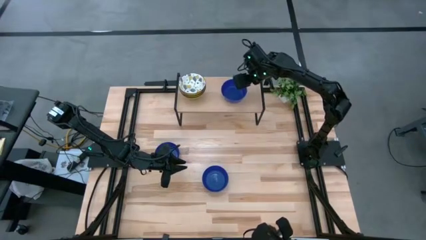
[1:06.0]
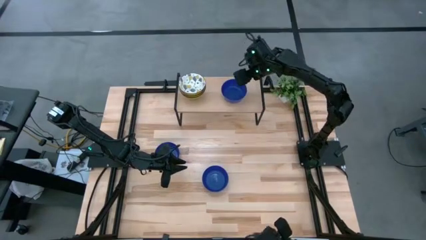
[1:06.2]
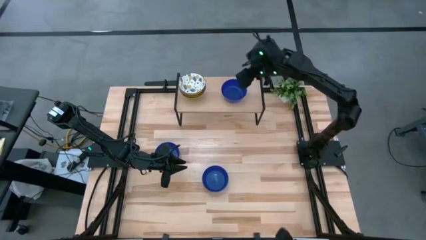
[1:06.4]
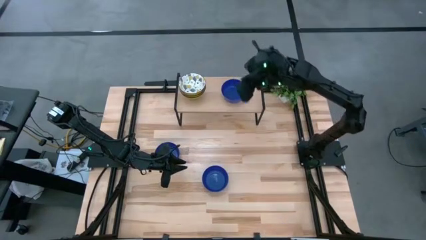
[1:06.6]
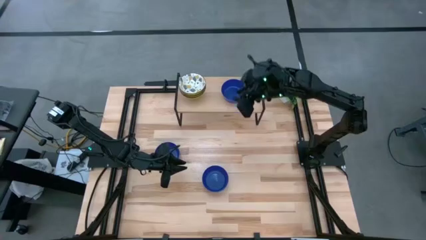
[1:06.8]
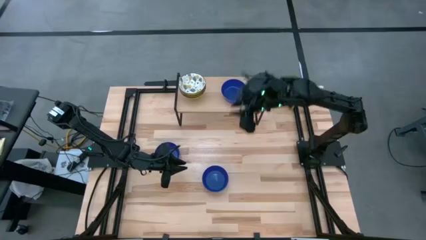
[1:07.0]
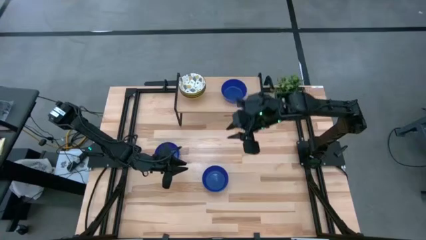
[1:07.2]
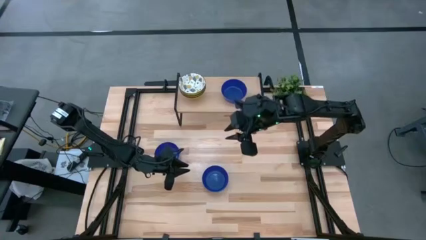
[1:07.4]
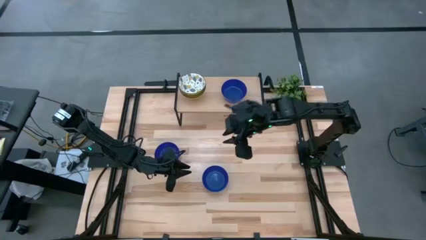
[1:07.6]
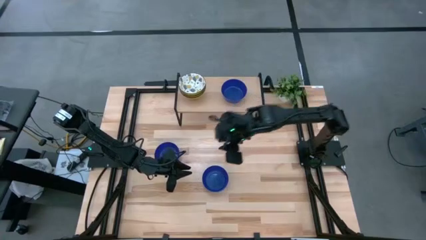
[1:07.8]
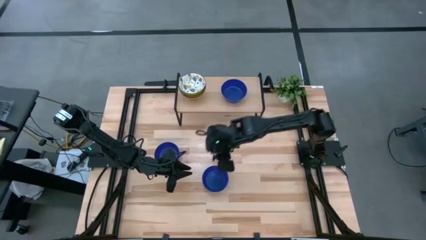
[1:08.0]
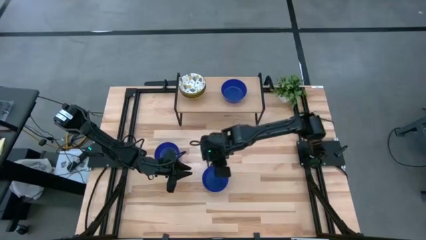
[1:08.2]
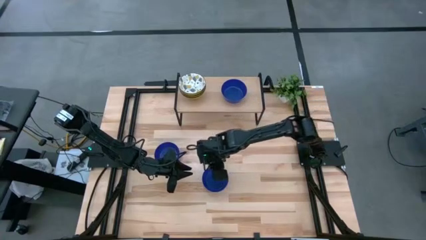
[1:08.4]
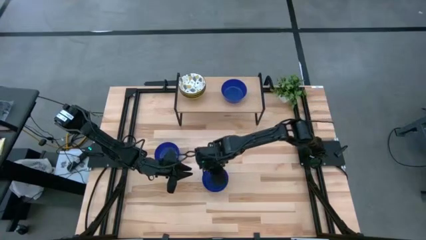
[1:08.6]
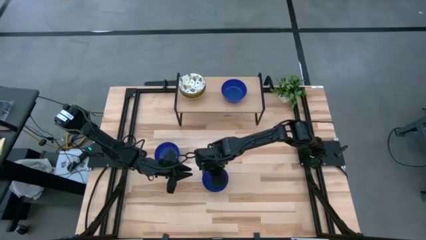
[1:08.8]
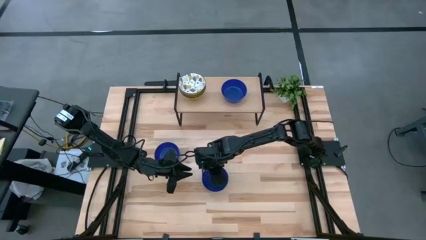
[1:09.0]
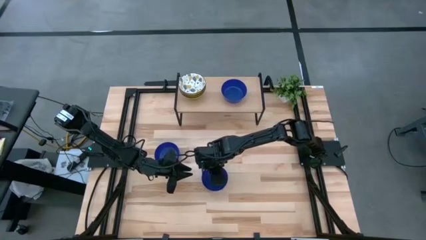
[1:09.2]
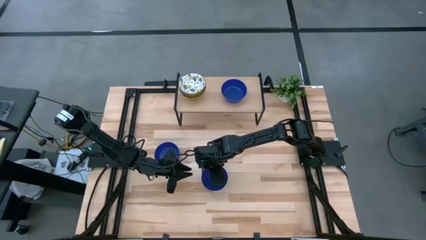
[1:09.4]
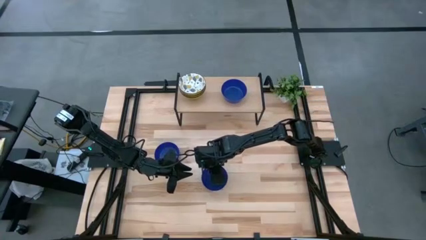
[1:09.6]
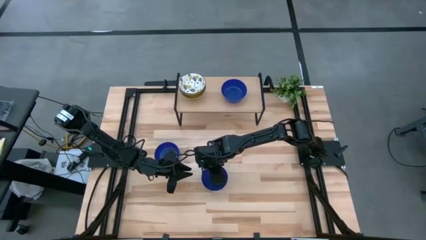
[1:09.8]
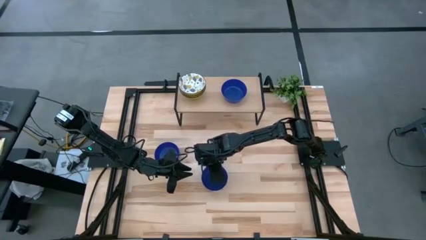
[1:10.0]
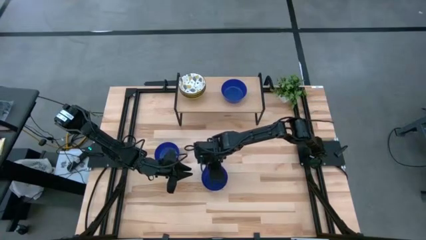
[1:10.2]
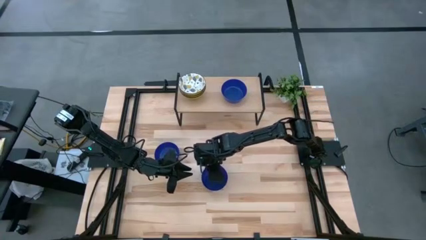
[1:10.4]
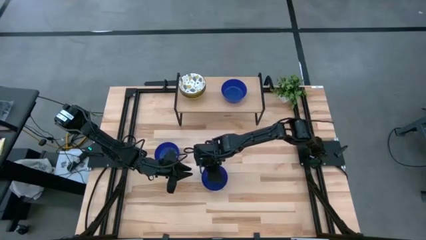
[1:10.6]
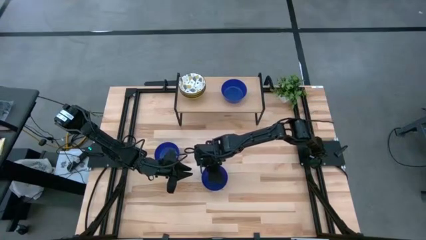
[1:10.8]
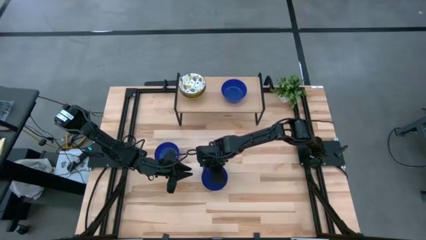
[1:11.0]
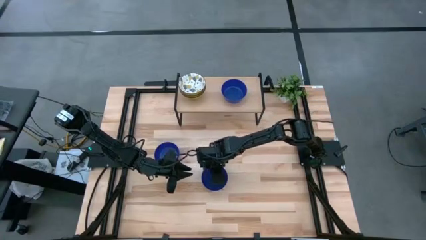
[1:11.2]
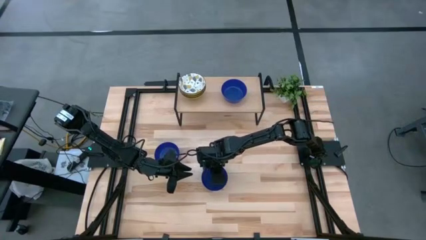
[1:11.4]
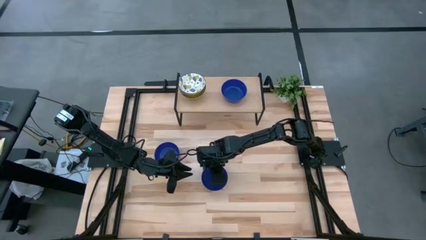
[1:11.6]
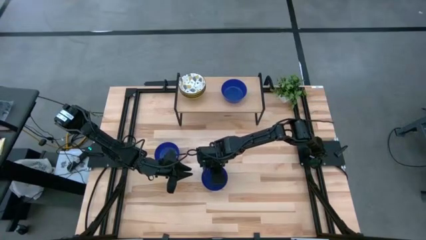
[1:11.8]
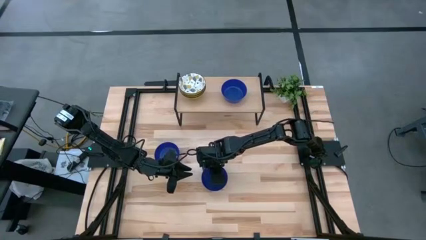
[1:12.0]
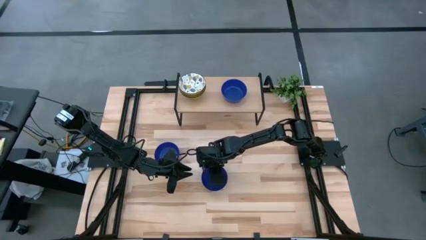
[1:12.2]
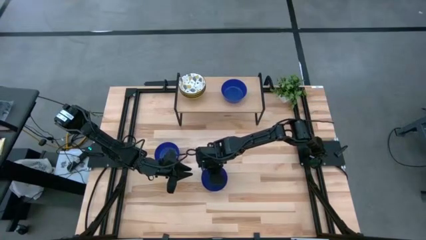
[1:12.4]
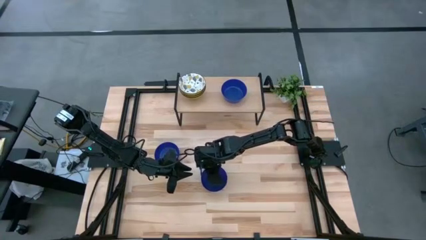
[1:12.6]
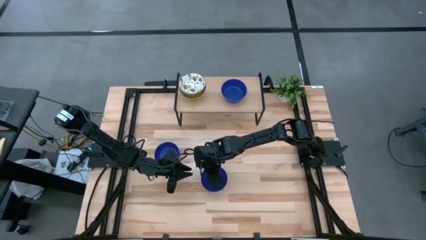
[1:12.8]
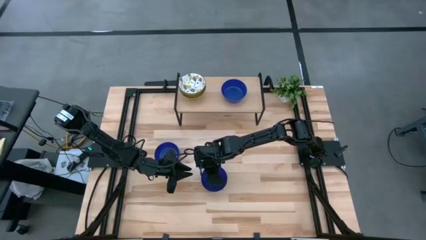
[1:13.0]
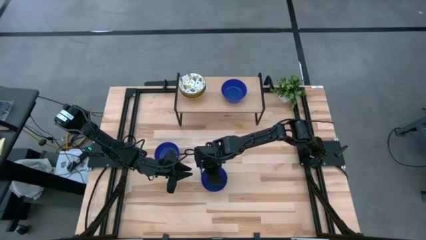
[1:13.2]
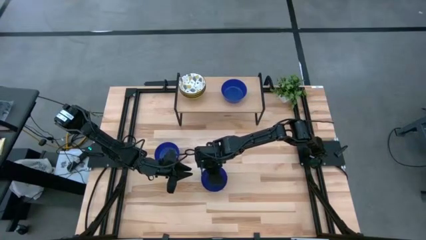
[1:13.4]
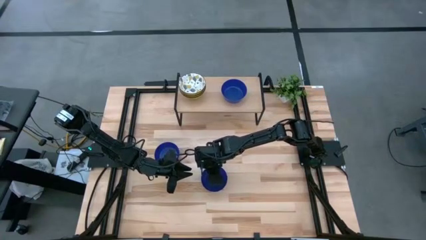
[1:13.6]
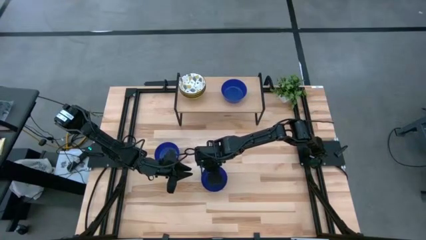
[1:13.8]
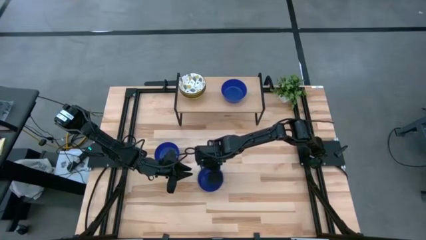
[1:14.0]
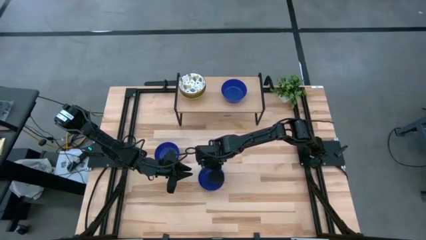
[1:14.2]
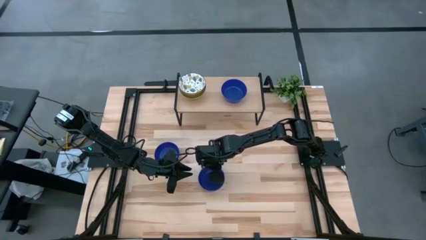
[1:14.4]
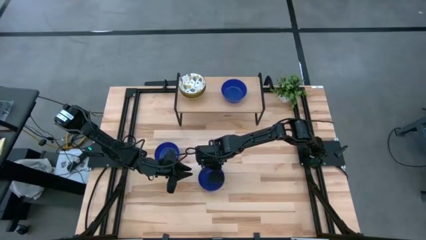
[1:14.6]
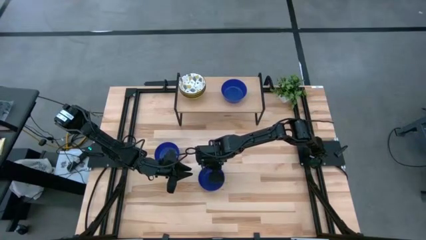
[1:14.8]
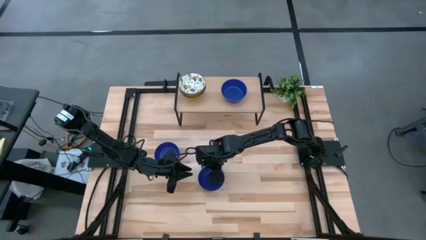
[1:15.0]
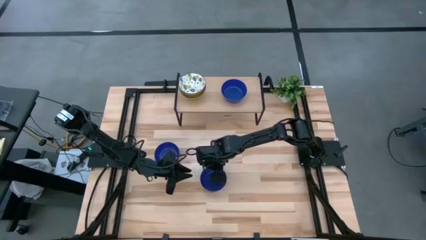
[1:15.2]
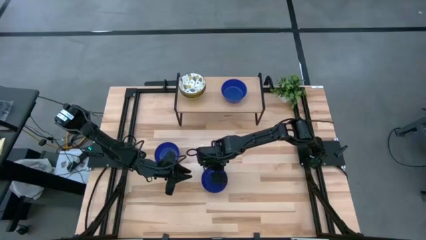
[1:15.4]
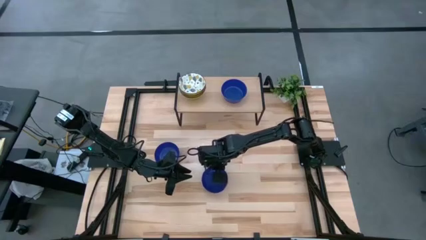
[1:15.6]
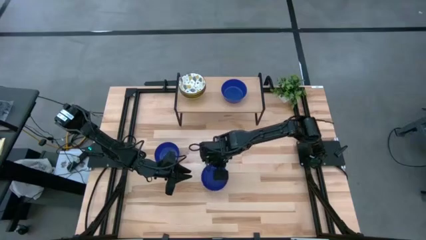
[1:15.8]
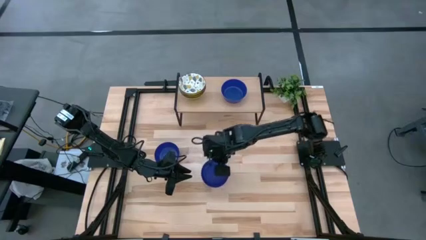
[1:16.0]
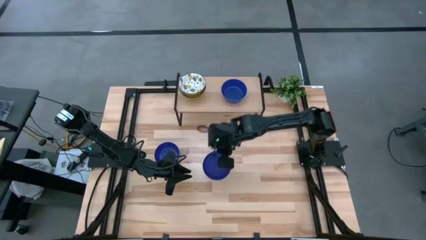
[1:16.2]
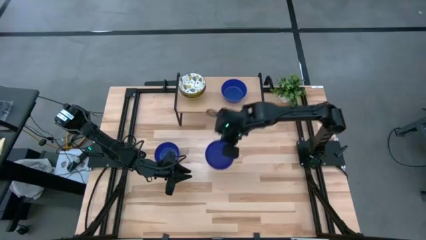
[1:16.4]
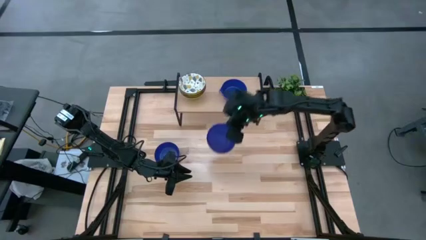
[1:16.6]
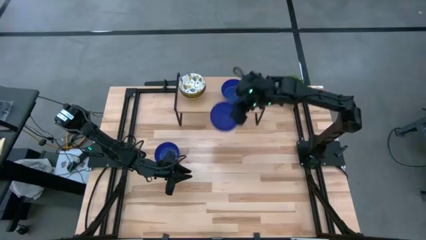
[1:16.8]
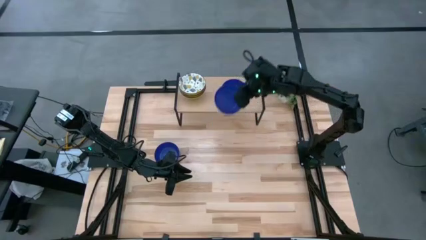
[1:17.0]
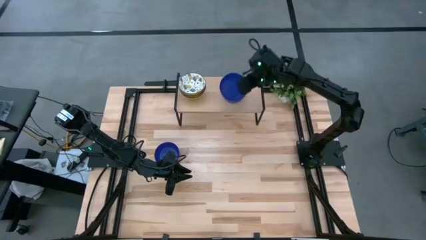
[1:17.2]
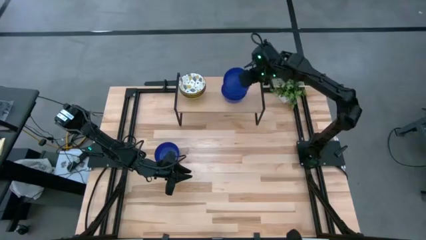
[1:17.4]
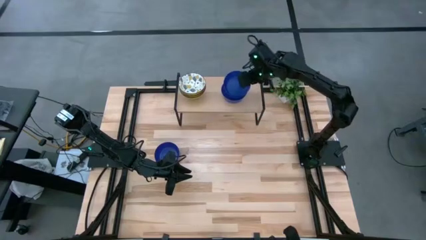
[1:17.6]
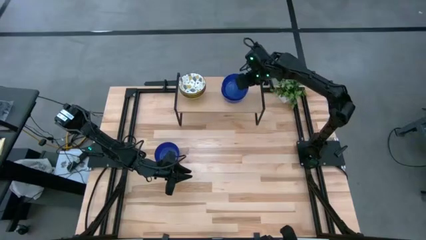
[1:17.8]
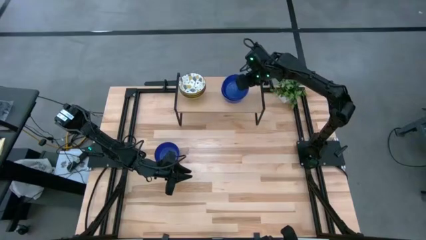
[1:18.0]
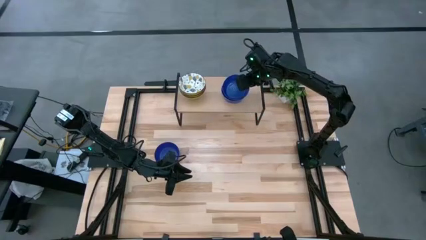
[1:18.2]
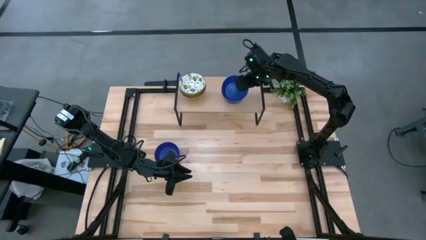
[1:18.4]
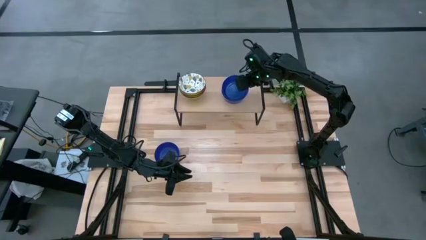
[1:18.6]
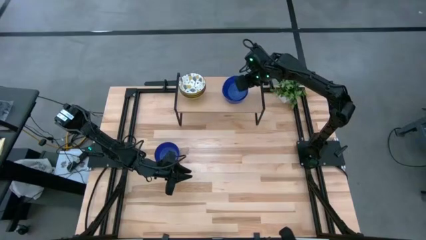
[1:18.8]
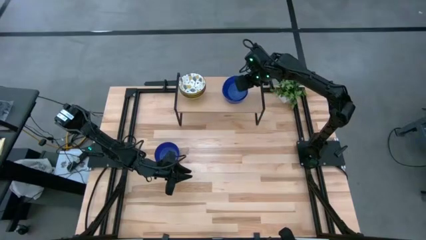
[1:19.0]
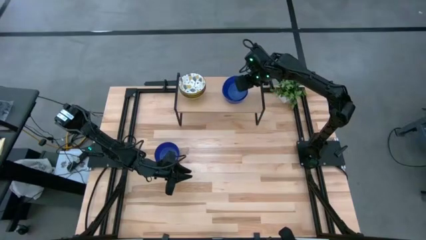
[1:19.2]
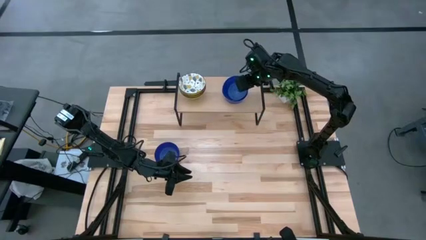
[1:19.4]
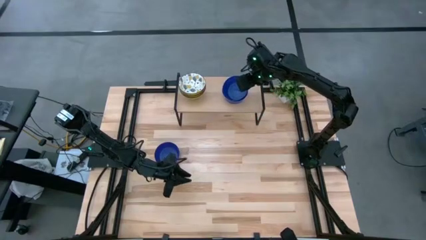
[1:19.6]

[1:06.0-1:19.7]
Task: Pick & Place Mini bowls
Stack the right blue bowl on top of the blue bowl on the shelf
